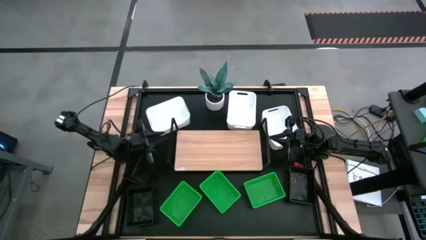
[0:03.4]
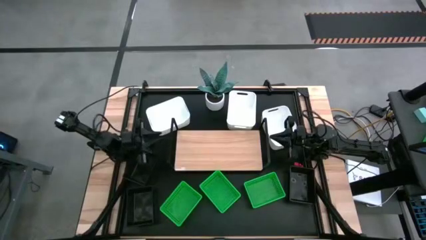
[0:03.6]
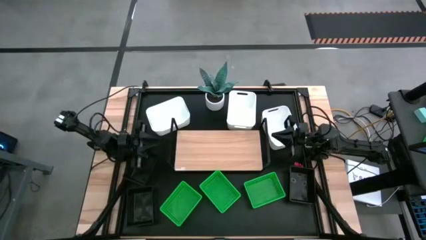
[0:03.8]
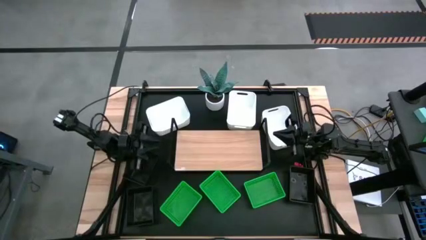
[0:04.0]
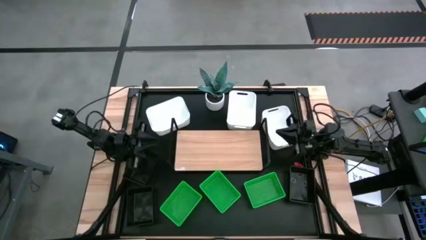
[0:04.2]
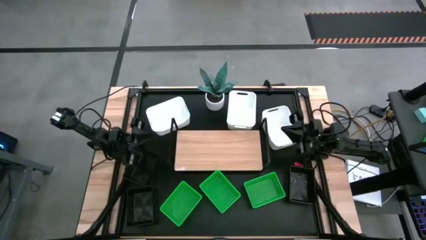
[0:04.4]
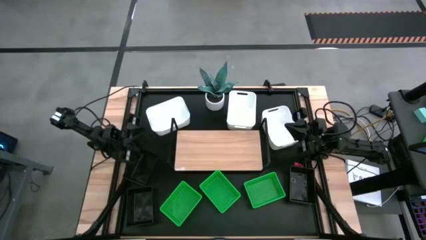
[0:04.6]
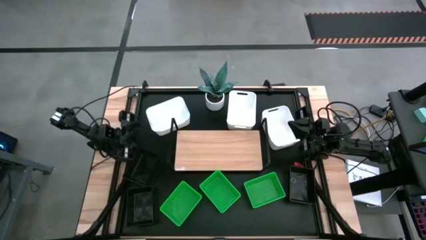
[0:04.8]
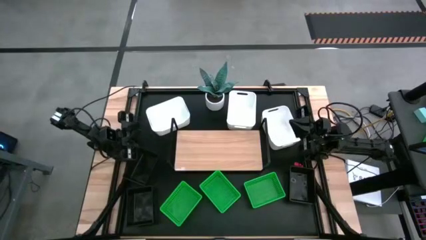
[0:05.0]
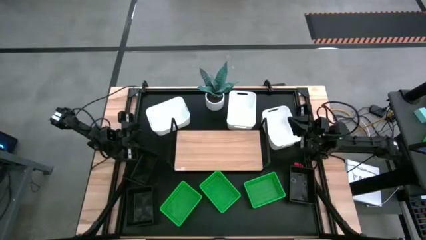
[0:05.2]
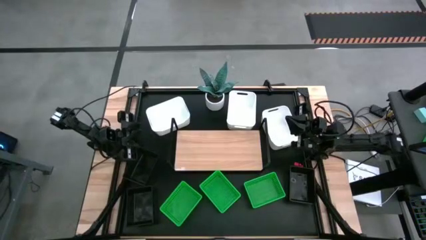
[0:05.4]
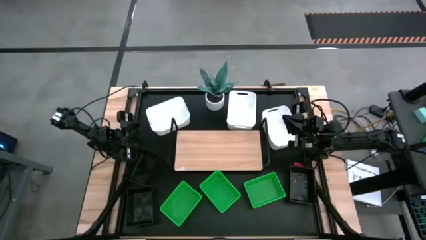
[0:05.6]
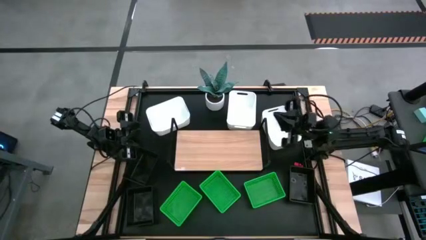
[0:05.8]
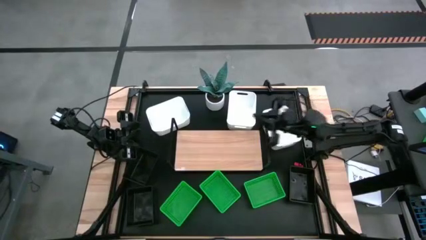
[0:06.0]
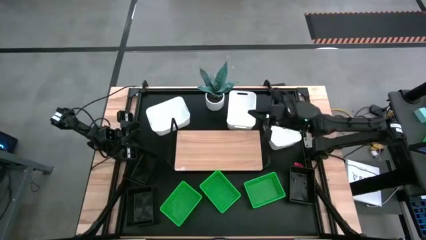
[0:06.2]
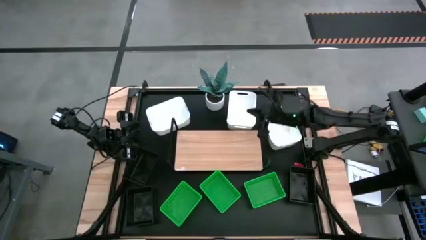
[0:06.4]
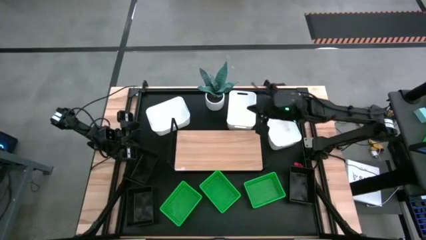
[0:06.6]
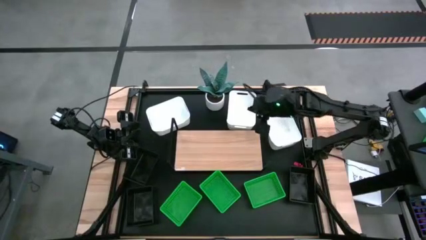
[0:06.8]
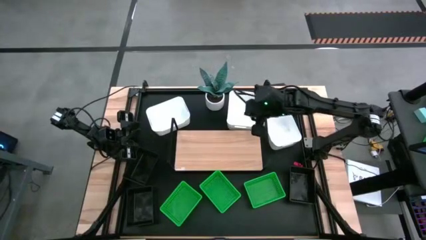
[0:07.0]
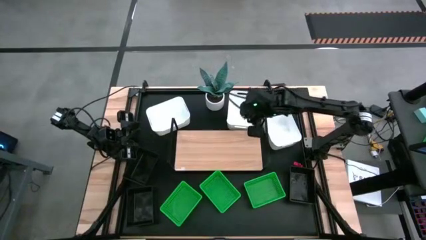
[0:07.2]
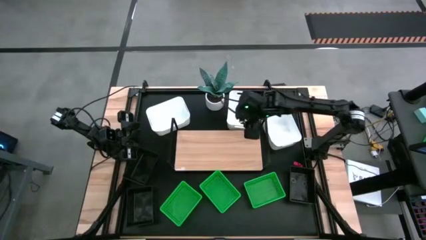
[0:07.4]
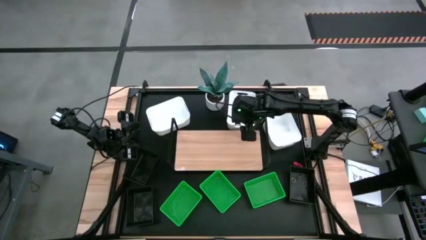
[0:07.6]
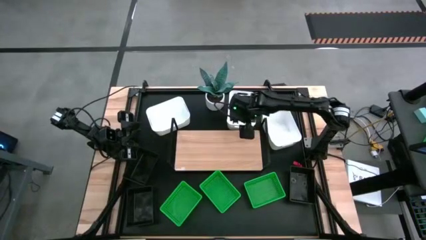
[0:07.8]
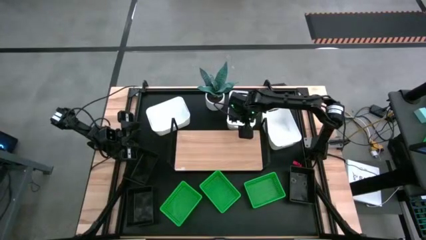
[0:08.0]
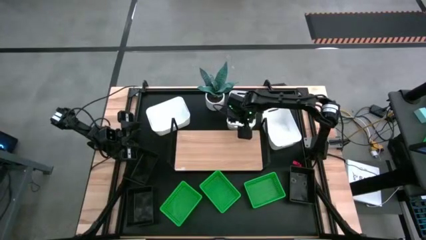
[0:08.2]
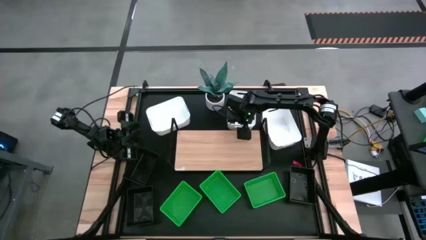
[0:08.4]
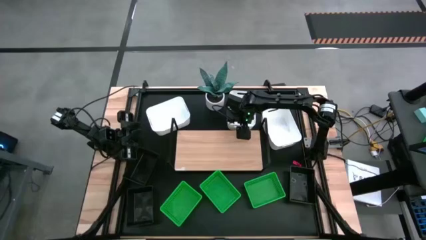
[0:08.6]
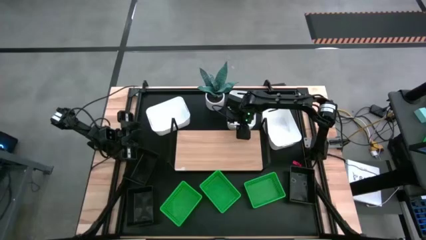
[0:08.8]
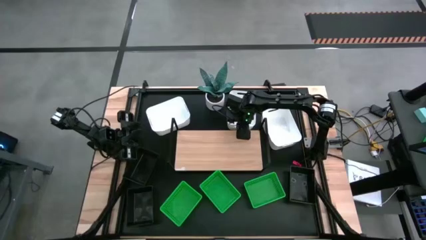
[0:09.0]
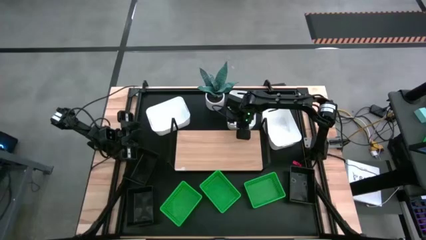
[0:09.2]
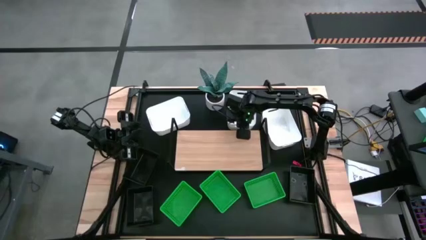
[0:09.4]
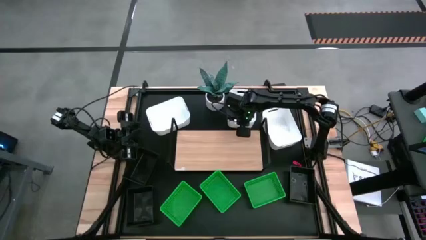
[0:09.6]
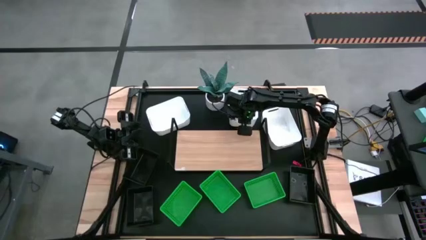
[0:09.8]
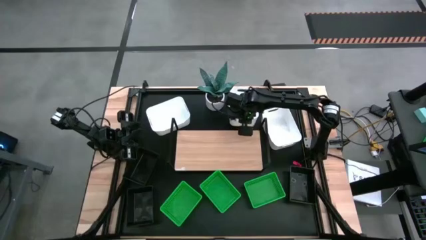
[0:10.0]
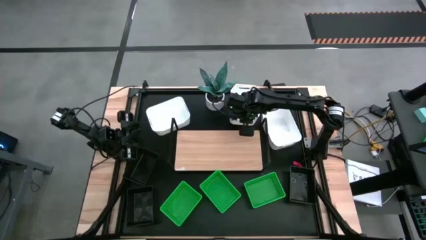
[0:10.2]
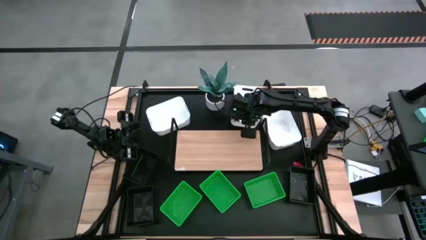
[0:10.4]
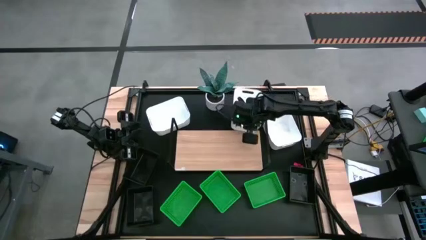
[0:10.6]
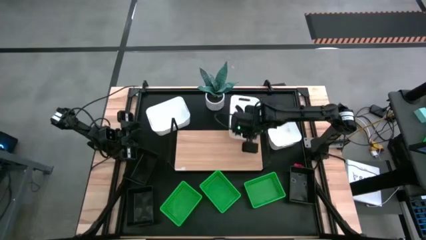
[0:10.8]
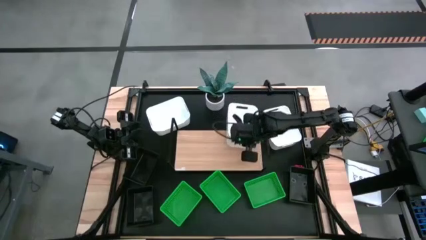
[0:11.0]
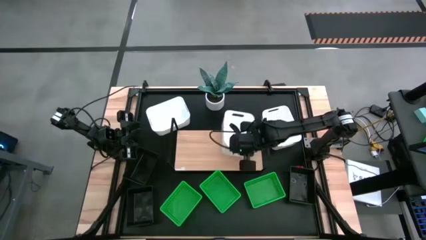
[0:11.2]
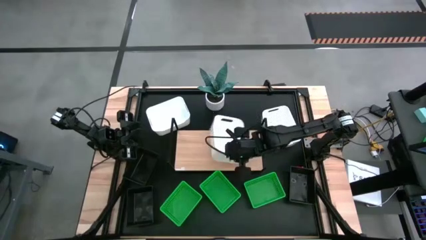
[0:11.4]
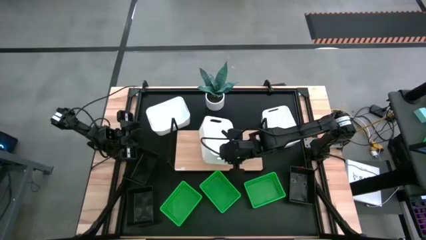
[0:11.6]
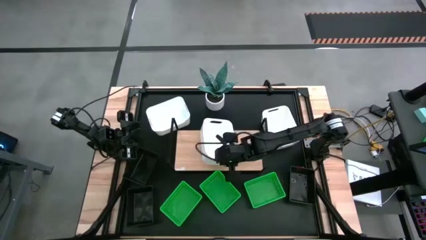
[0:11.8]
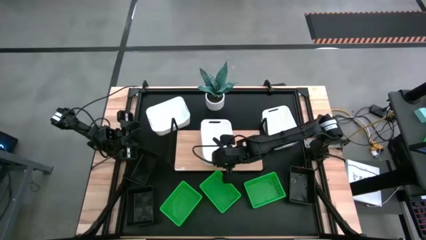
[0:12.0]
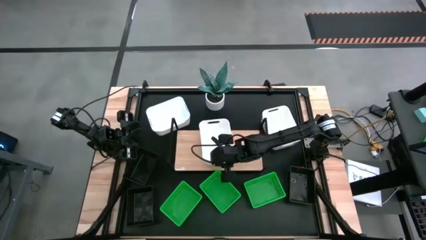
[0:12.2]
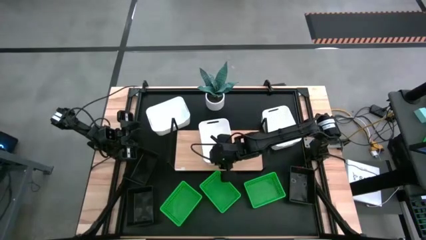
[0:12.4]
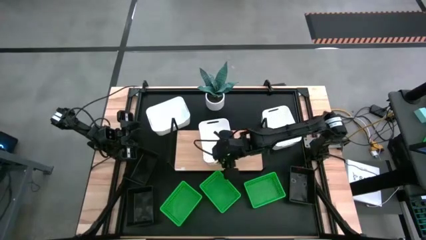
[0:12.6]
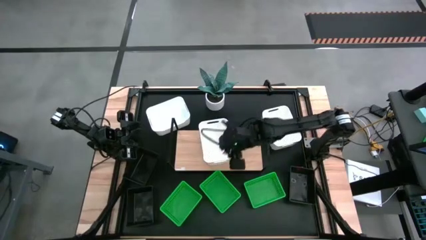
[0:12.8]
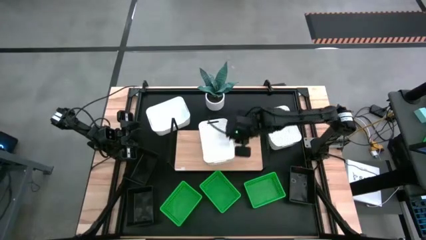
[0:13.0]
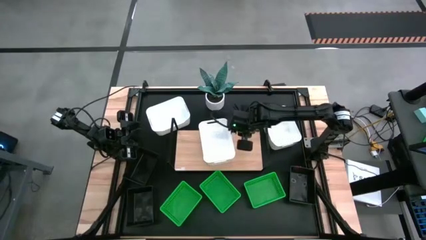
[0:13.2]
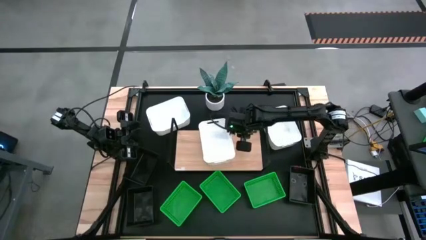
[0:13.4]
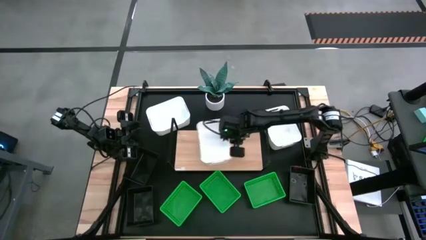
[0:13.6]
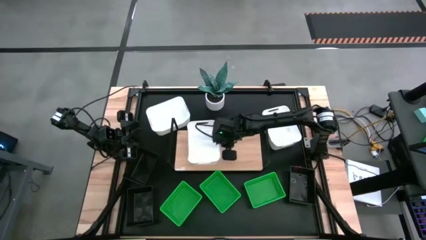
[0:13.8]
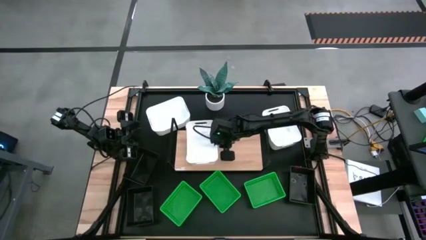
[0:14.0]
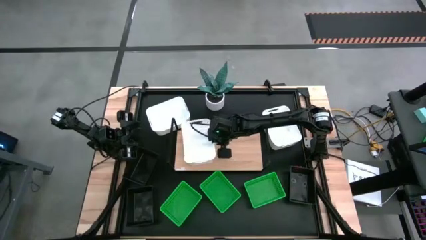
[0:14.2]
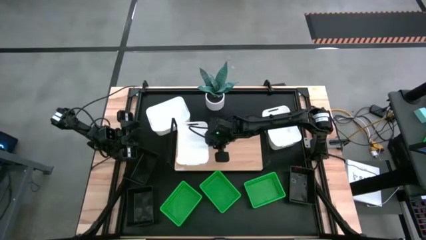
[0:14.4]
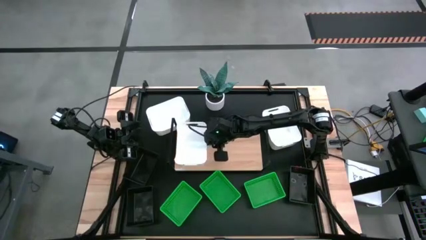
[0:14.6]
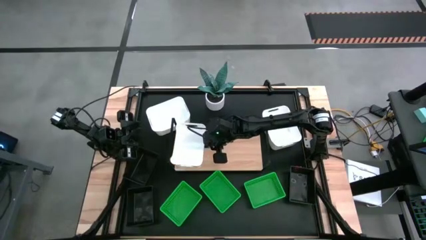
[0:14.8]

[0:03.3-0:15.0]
Task: Stack baskets on shelf by color
Put the middle white bin on the shelf

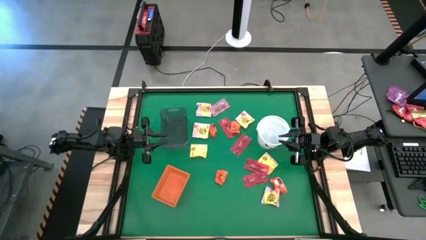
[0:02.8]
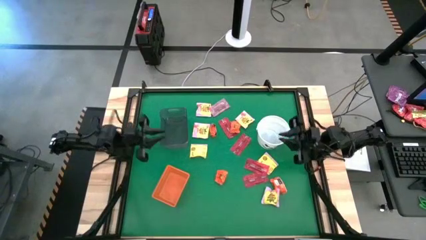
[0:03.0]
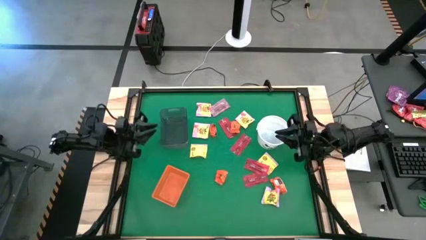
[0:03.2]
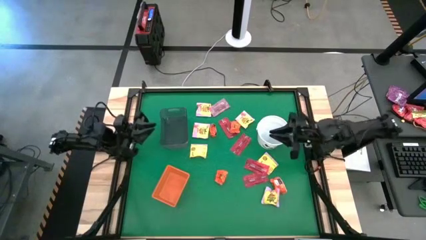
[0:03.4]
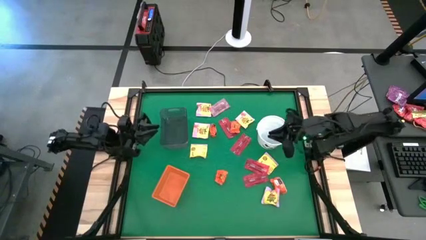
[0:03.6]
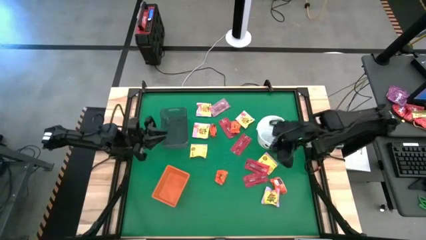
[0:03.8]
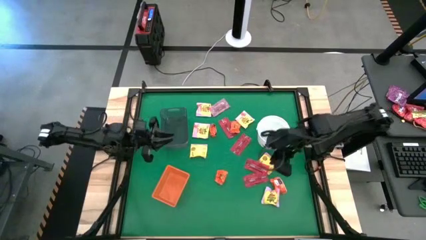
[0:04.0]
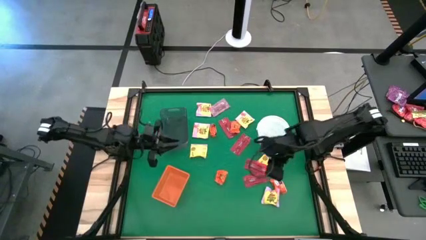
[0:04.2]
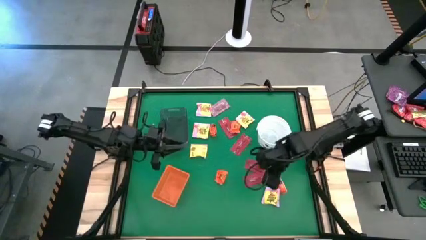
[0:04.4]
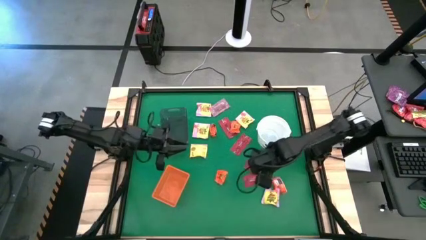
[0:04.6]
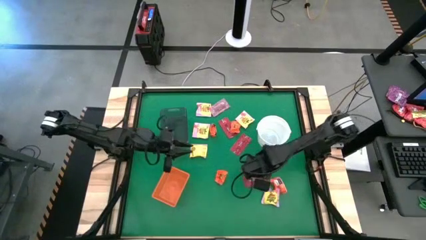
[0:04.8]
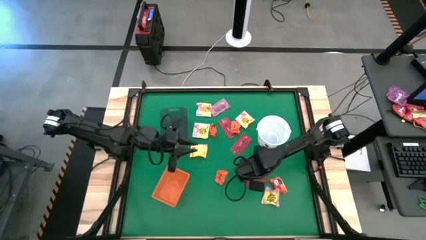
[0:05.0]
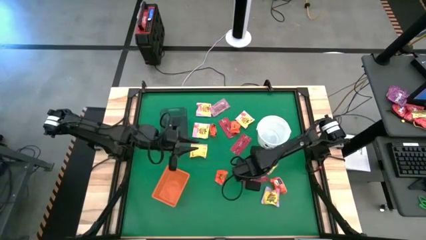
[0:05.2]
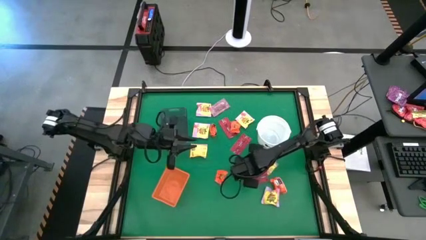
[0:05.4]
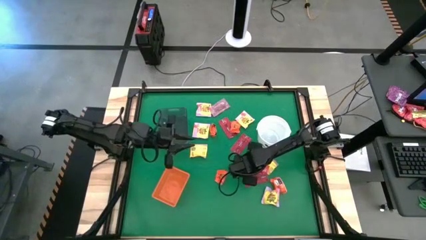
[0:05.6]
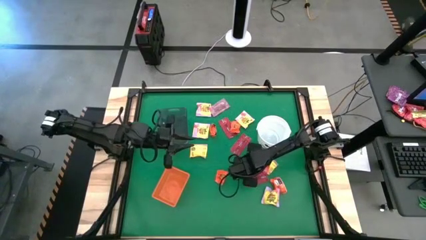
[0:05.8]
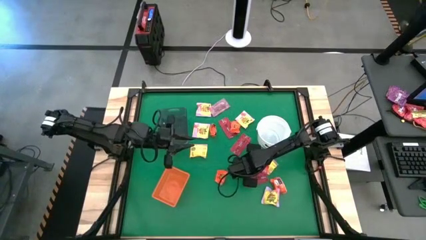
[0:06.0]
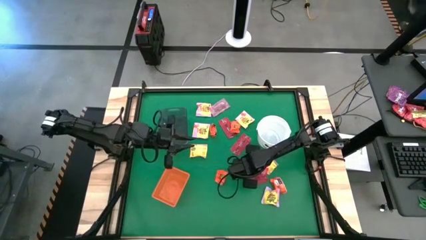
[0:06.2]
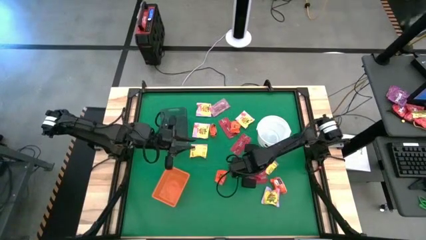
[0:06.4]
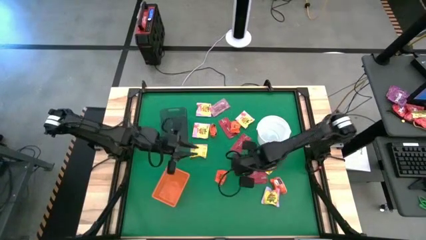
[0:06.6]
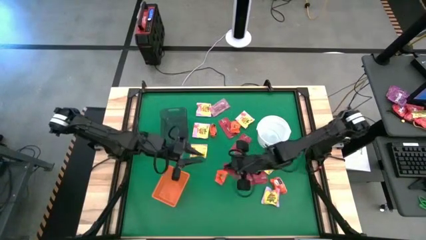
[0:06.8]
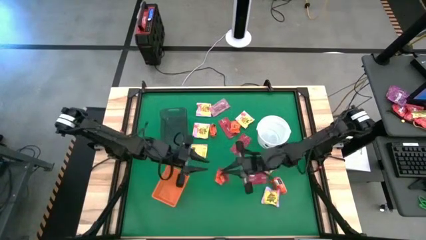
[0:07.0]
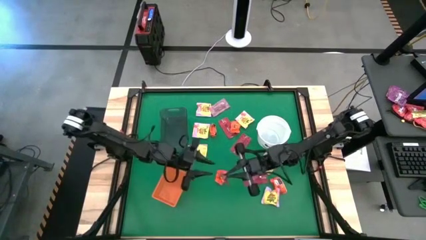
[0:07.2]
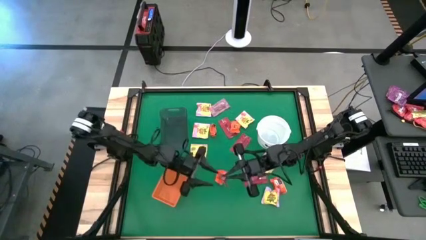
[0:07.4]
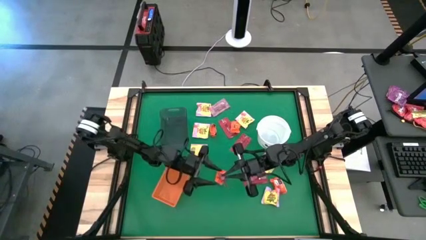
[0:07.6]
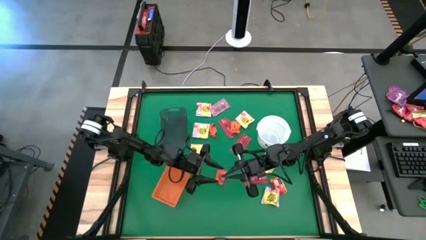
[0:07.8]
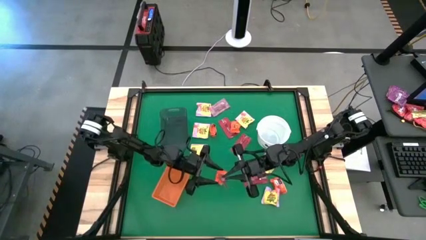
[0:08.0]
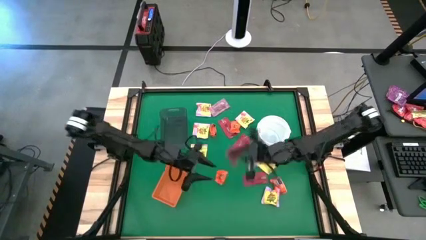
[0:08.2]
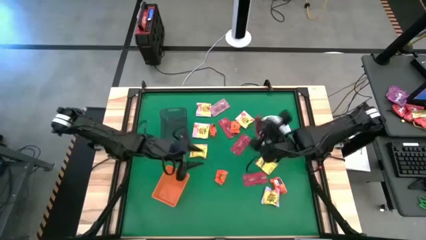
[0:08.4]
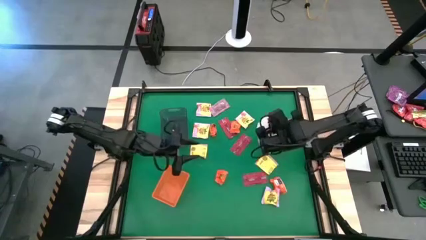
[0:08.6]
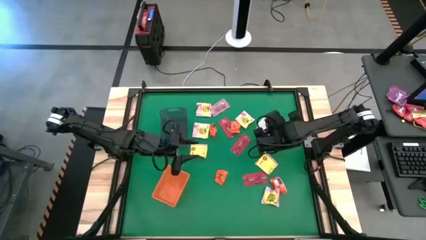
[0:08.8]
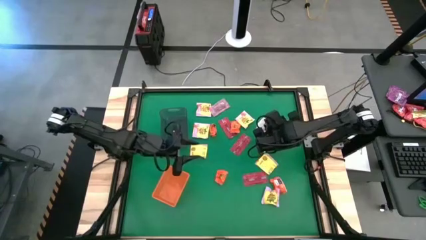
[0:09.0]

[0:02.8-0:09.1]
Task: Sort candy by brand, put in halloween buckets
Put the red candy into the white bucket
